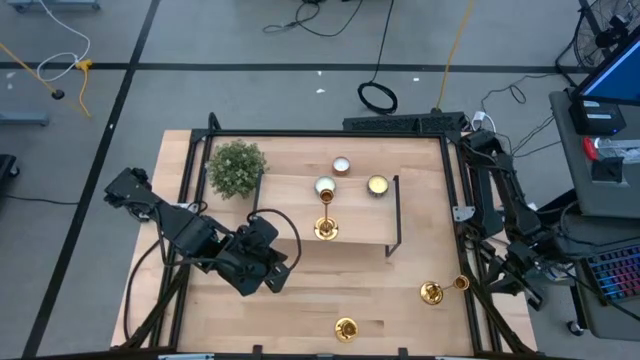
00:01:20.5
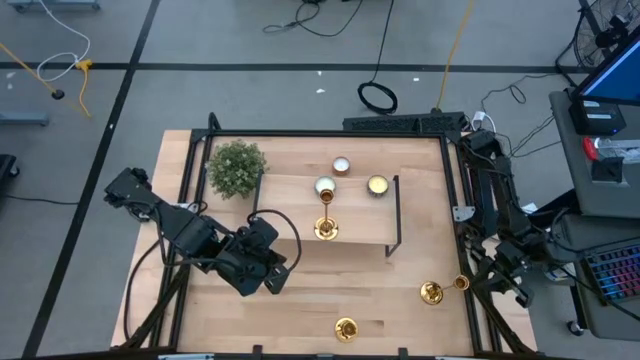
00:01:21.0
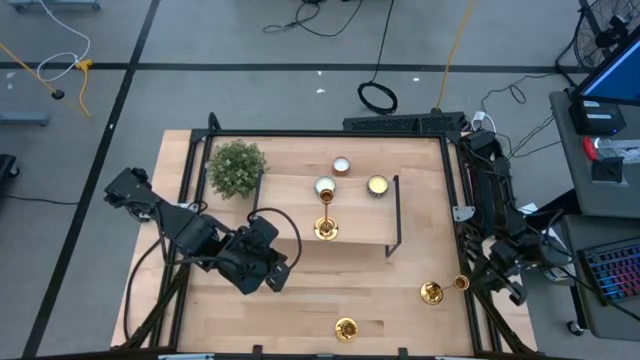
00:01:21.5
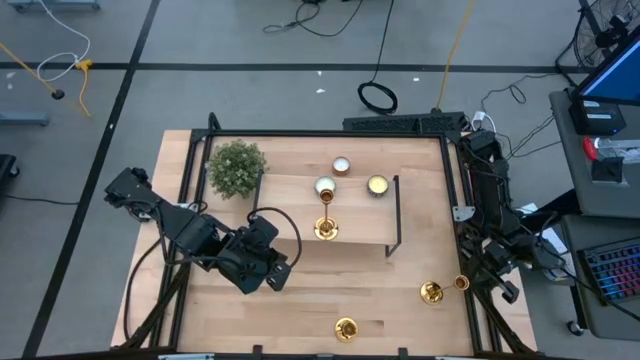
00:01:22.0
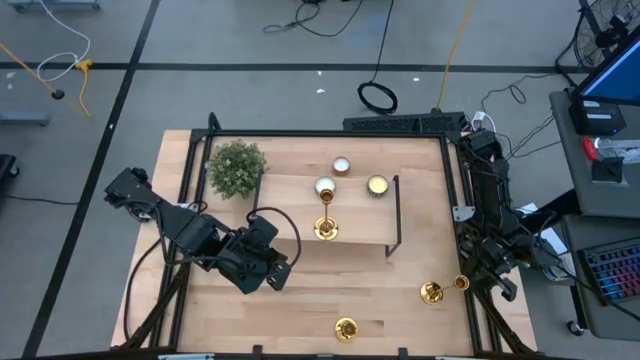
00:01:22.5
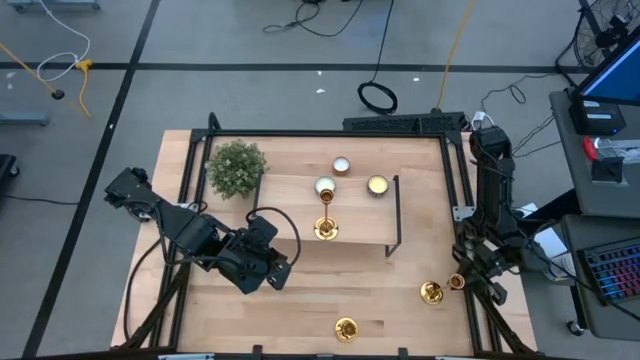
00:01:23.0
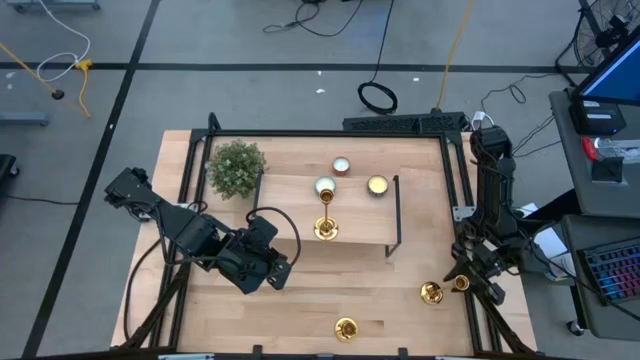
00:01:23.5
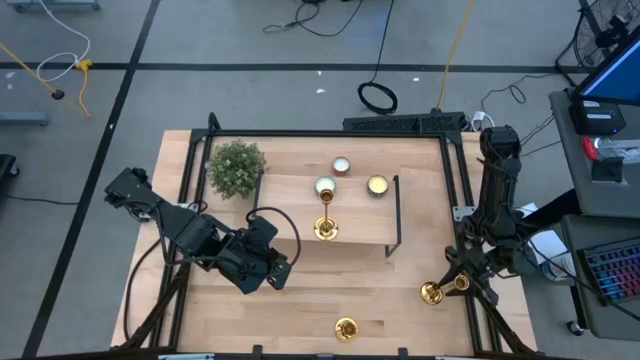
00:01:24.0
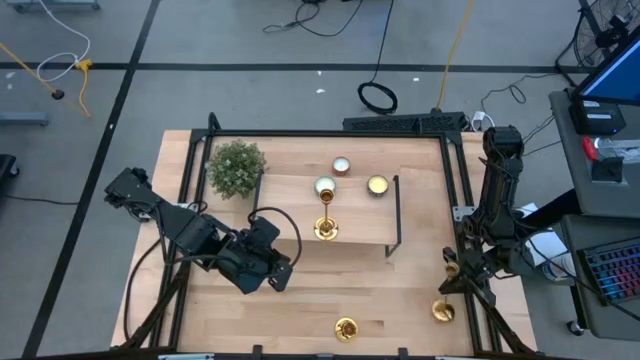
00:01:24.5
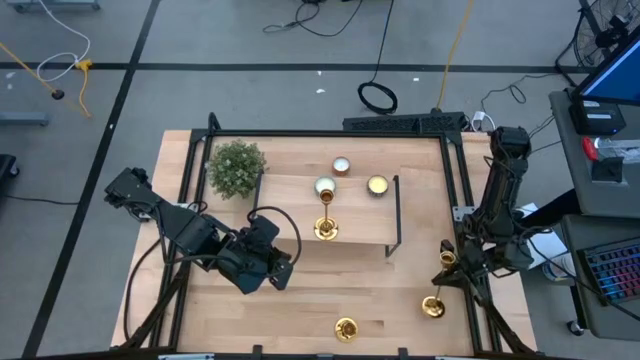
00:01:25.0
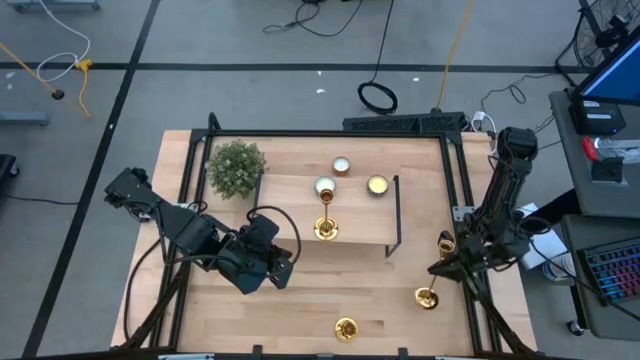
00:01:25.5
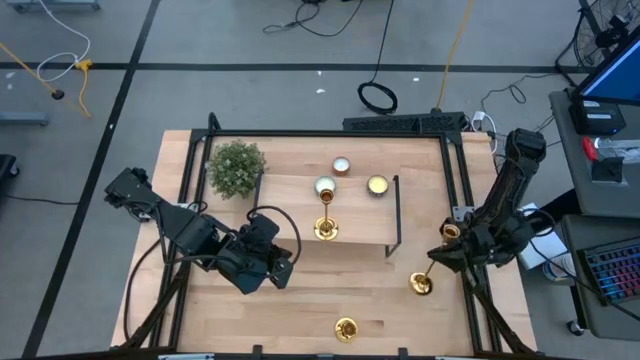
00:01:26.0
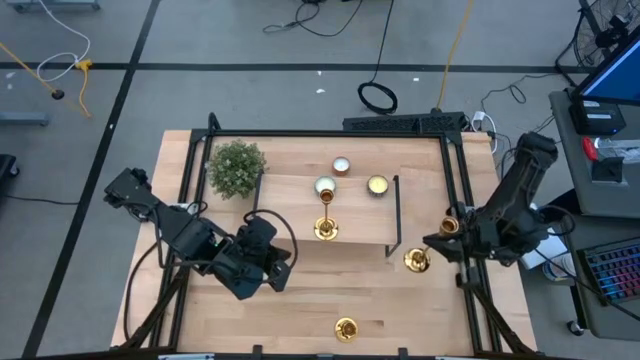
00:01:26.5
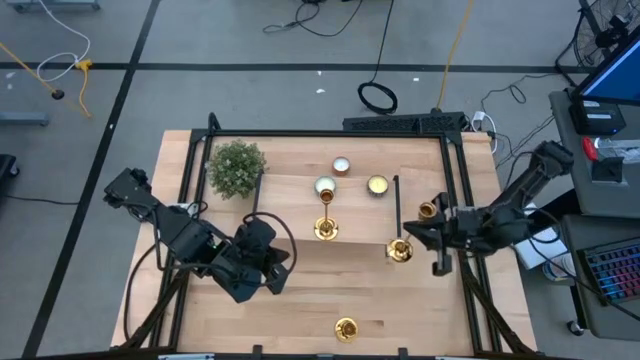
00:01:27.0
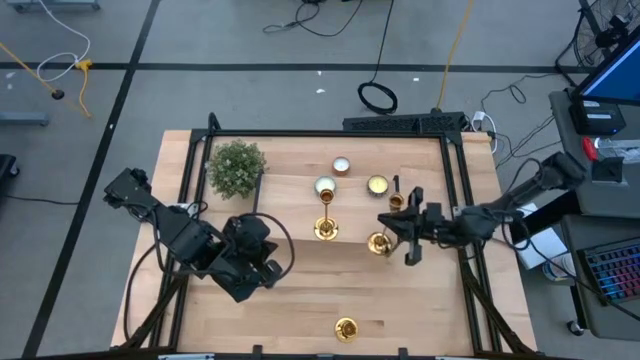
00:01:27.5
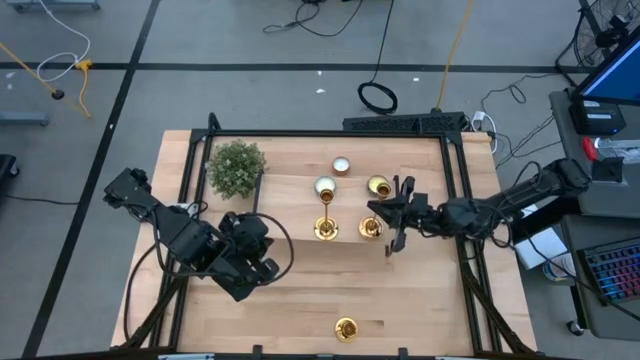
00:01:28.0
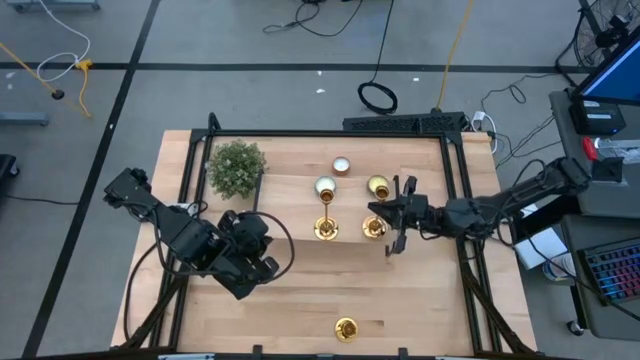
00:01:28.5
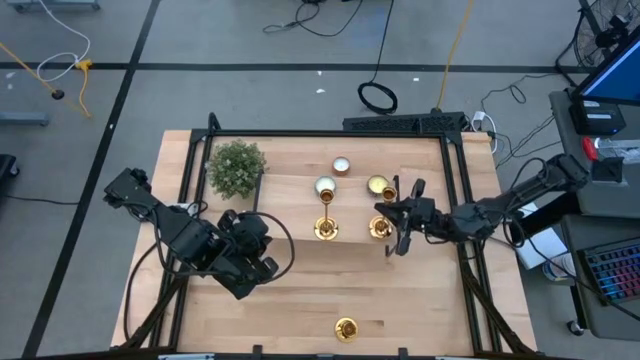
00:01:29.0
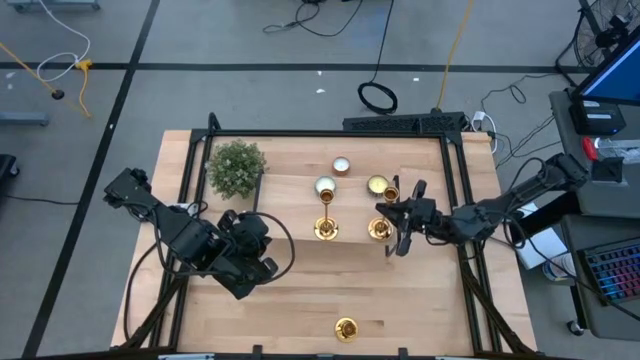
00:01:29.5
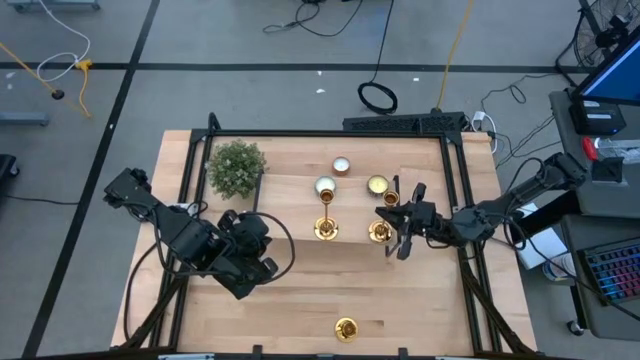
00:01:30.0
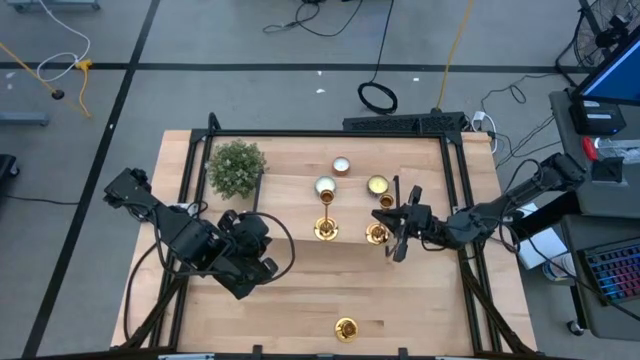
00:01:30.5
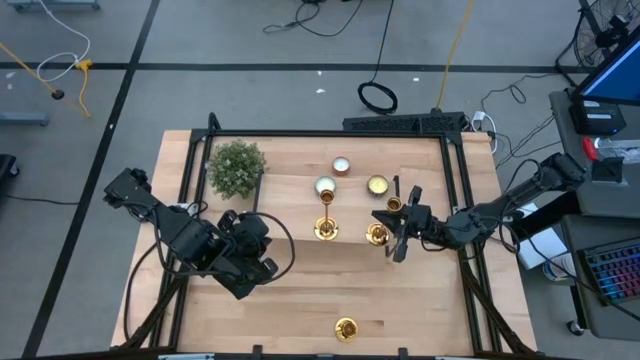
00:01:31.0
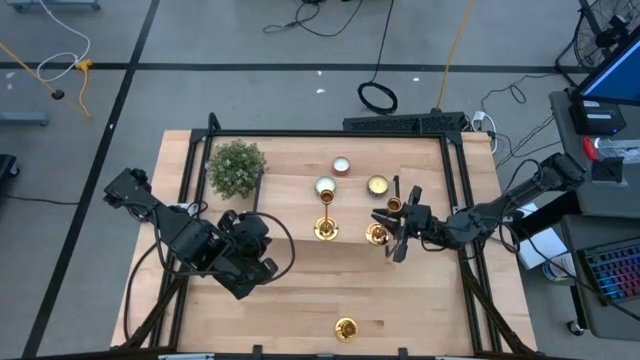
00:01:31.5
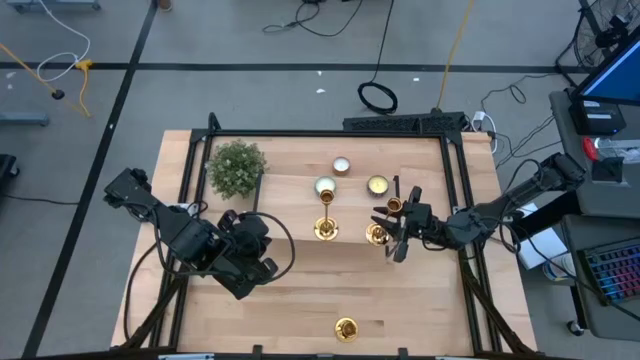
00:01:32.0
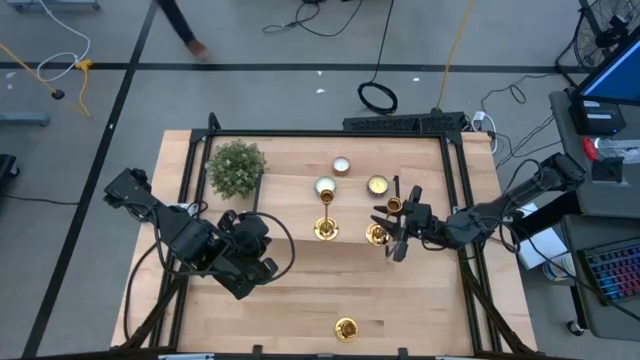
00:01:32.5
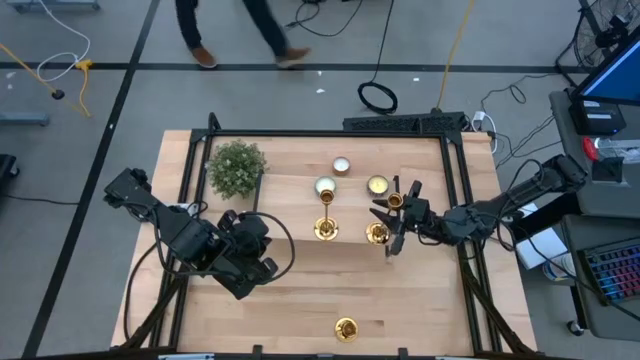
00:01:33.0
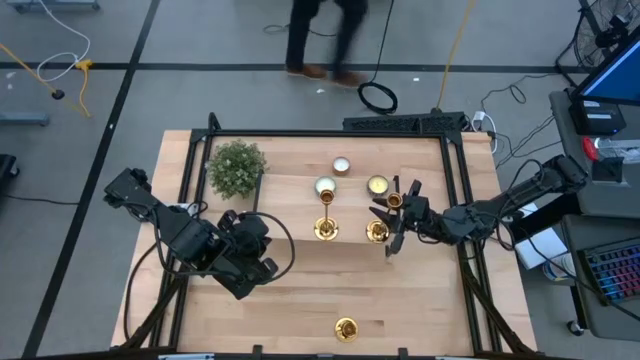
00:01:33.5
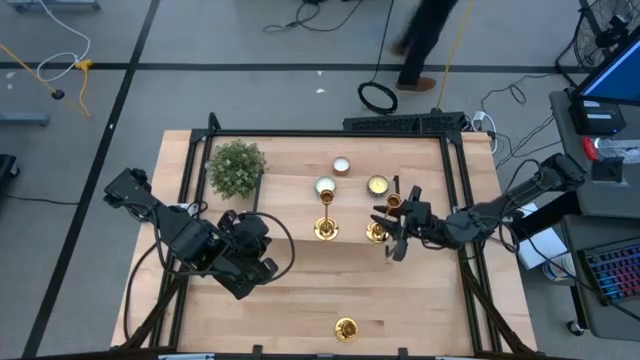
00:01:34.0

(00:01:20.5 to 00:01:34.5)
Task: Pick & Place candle stick holders
Put the right gold candle holder on the shelf
